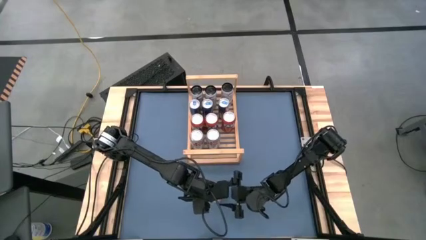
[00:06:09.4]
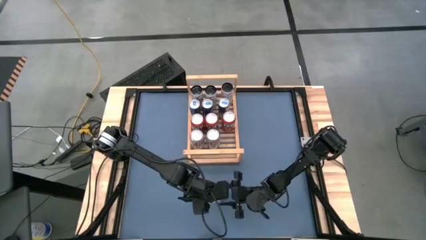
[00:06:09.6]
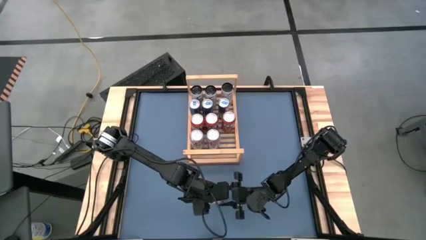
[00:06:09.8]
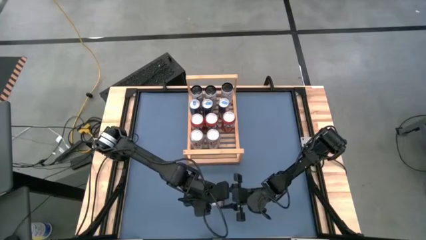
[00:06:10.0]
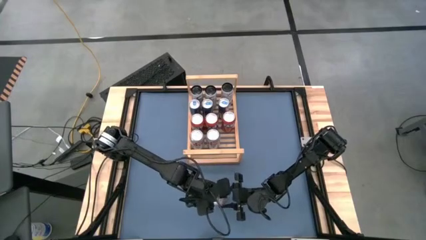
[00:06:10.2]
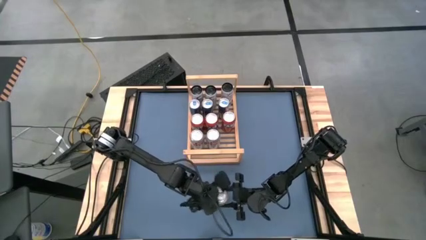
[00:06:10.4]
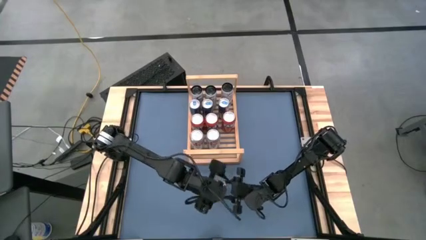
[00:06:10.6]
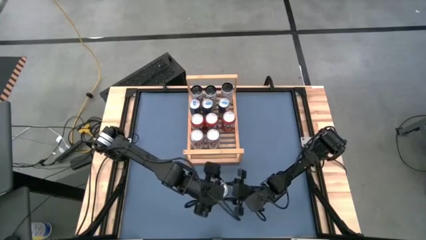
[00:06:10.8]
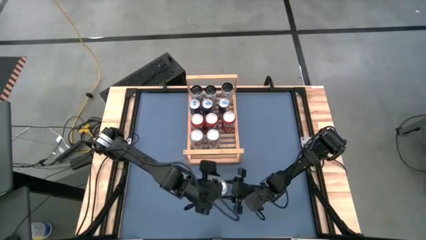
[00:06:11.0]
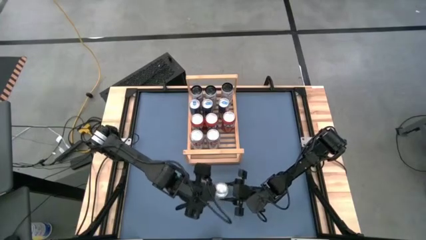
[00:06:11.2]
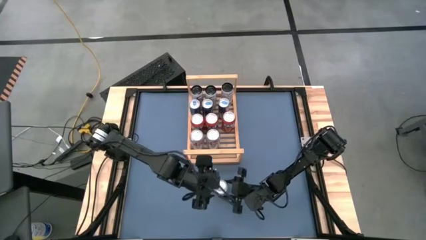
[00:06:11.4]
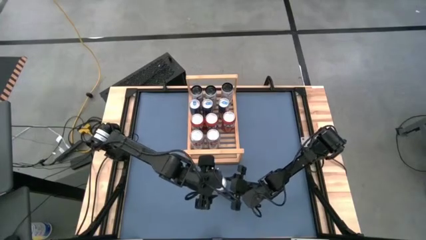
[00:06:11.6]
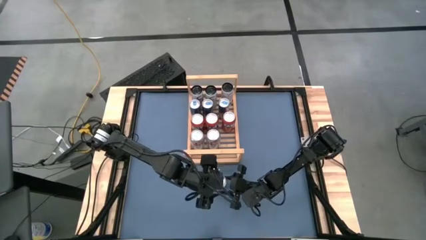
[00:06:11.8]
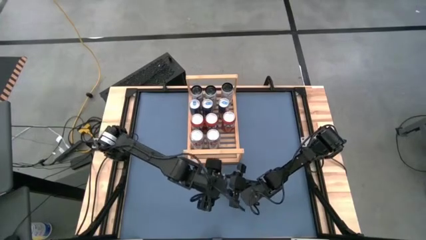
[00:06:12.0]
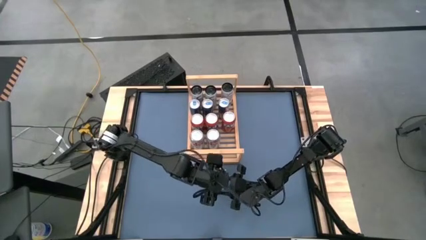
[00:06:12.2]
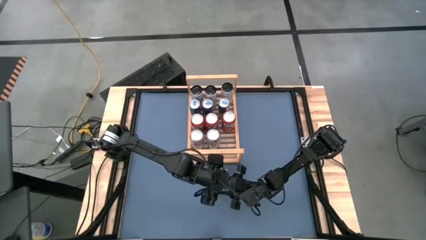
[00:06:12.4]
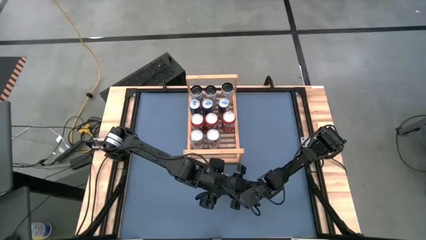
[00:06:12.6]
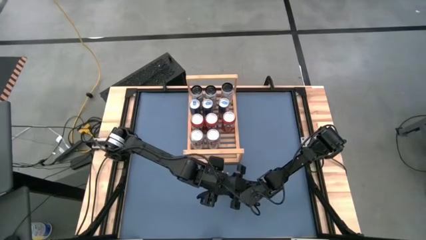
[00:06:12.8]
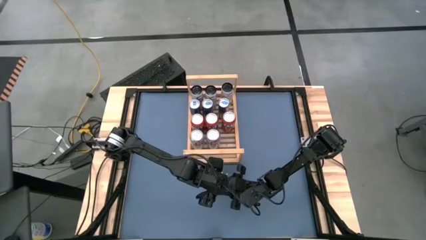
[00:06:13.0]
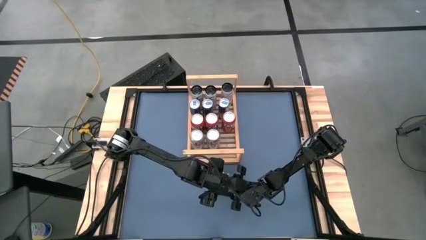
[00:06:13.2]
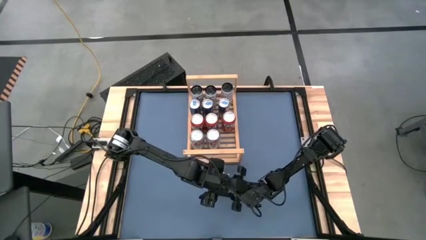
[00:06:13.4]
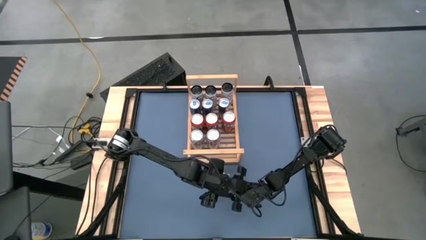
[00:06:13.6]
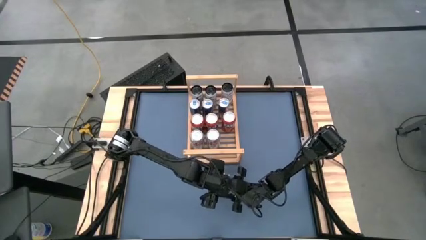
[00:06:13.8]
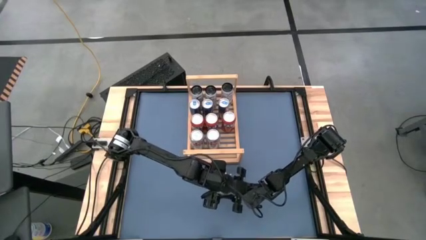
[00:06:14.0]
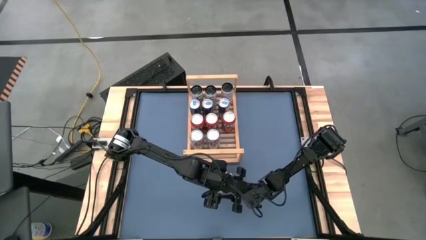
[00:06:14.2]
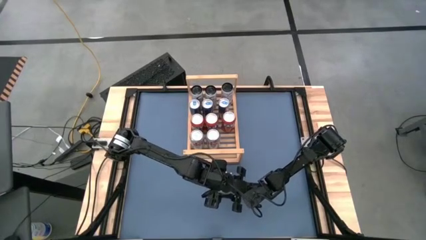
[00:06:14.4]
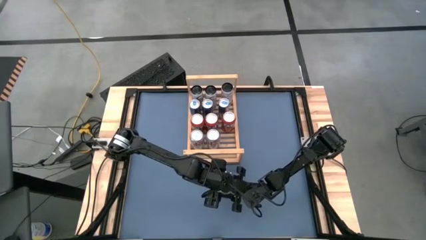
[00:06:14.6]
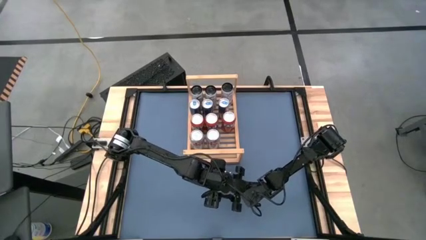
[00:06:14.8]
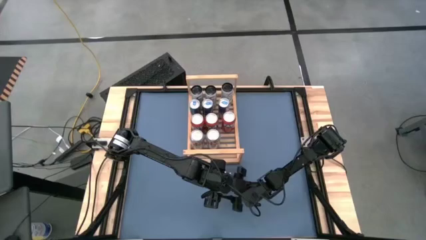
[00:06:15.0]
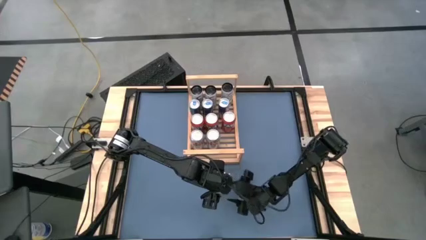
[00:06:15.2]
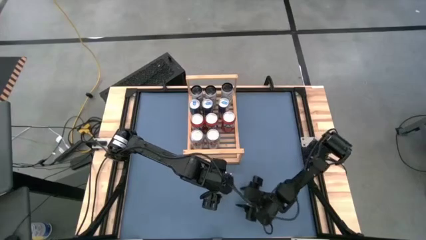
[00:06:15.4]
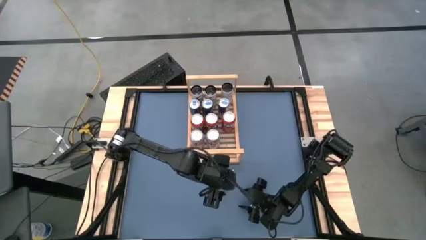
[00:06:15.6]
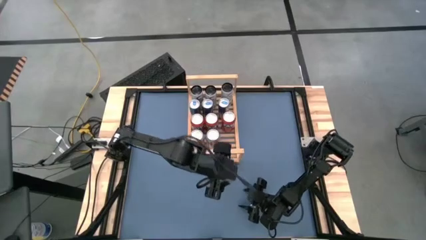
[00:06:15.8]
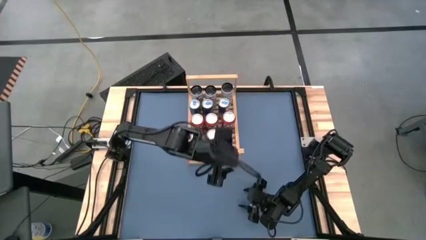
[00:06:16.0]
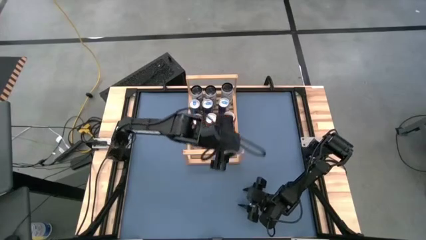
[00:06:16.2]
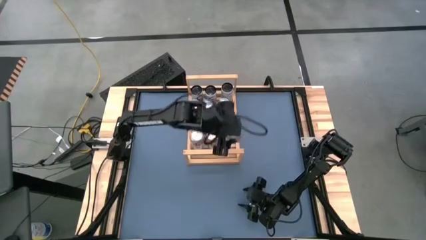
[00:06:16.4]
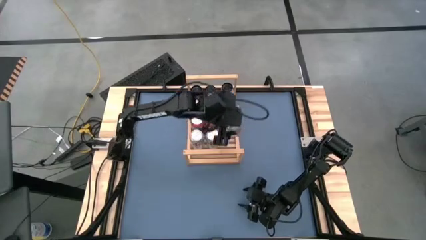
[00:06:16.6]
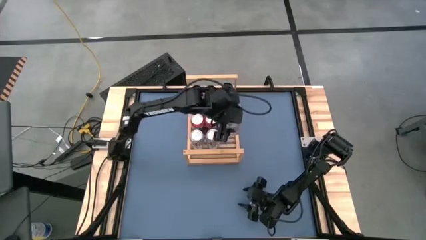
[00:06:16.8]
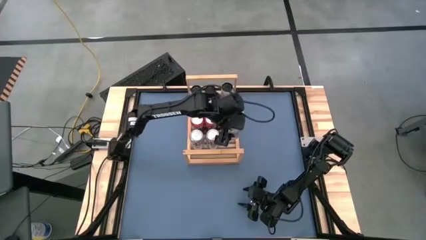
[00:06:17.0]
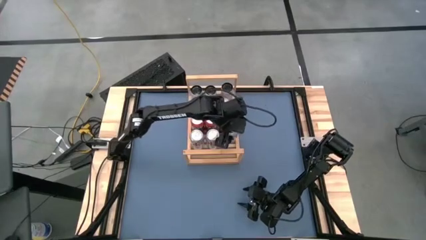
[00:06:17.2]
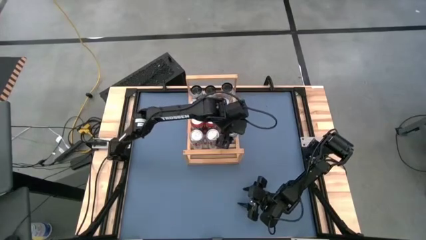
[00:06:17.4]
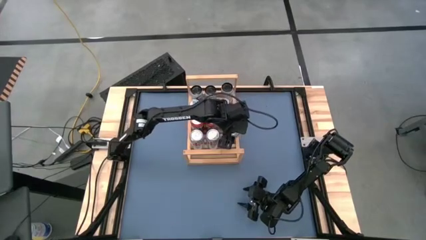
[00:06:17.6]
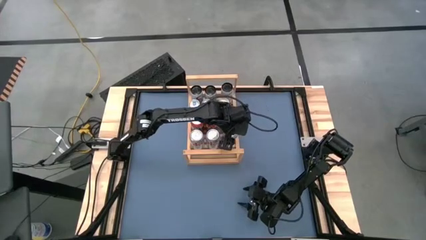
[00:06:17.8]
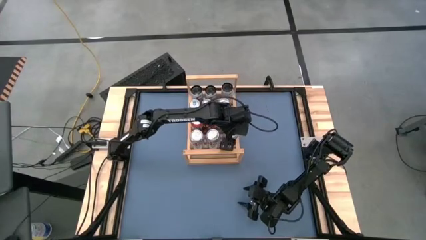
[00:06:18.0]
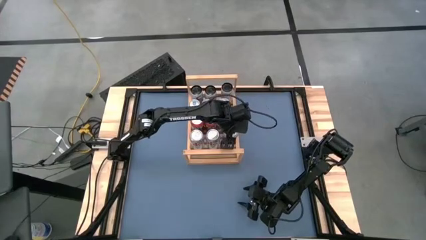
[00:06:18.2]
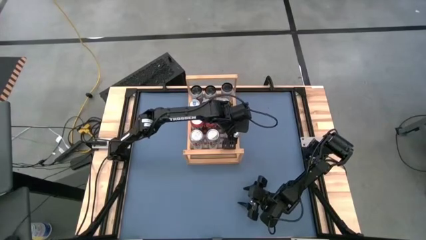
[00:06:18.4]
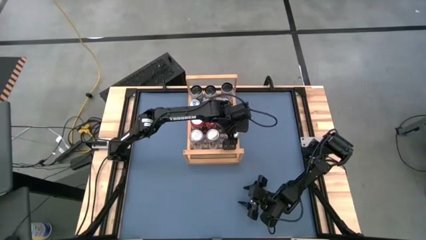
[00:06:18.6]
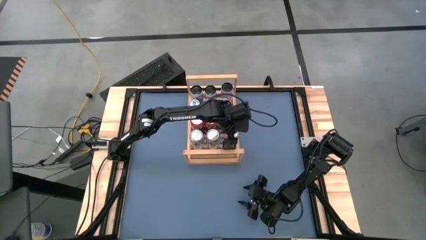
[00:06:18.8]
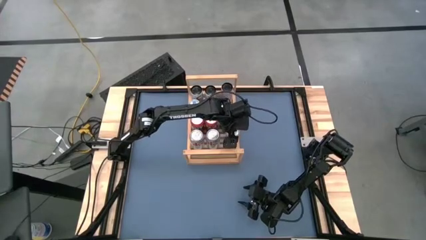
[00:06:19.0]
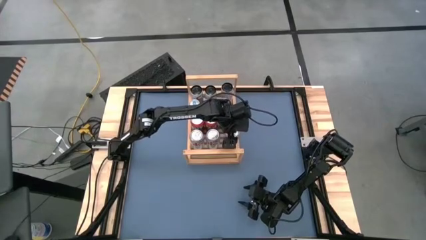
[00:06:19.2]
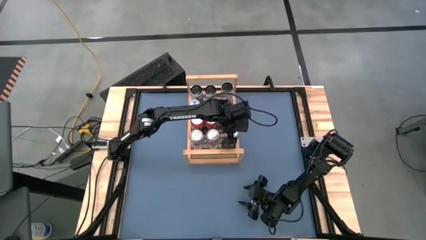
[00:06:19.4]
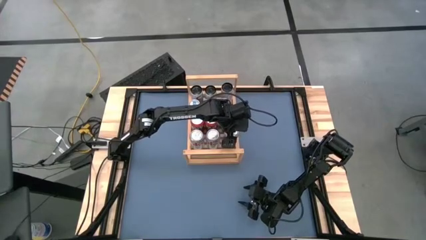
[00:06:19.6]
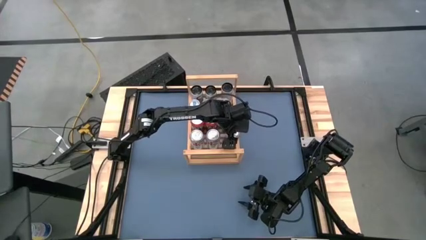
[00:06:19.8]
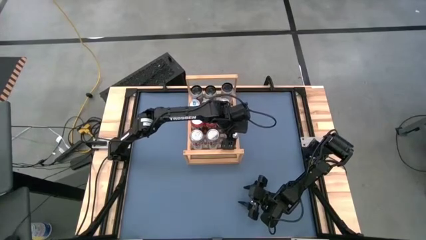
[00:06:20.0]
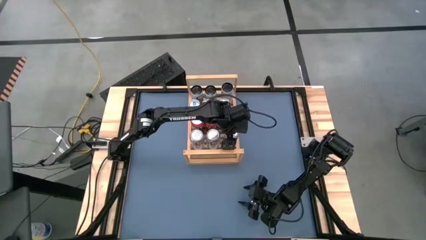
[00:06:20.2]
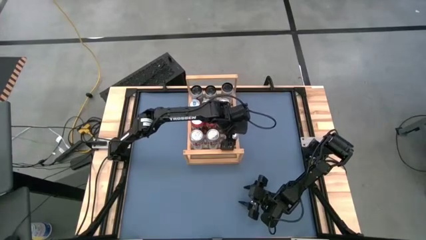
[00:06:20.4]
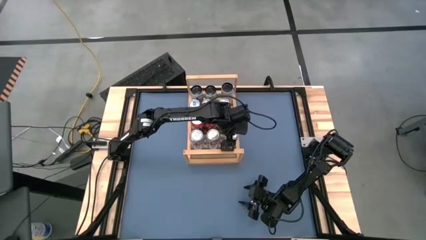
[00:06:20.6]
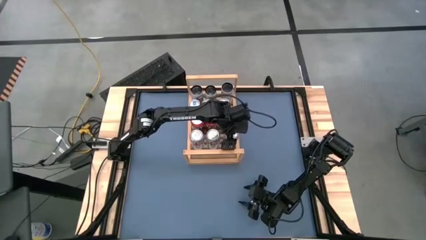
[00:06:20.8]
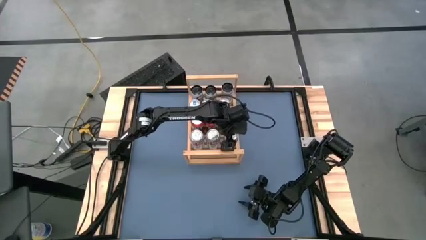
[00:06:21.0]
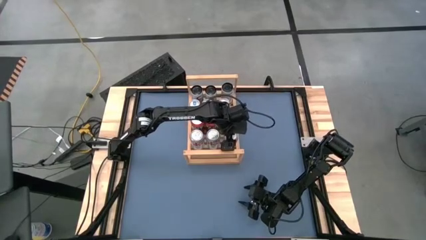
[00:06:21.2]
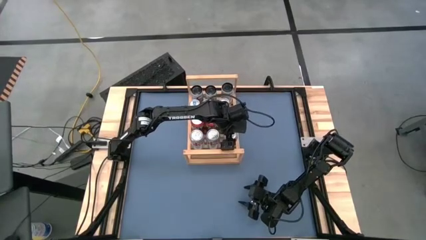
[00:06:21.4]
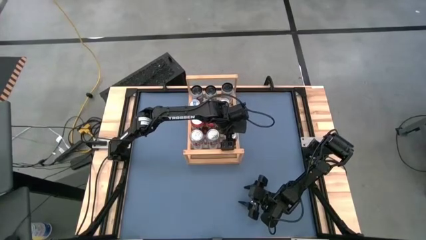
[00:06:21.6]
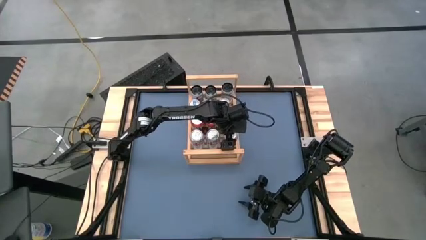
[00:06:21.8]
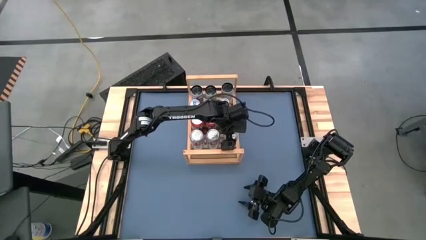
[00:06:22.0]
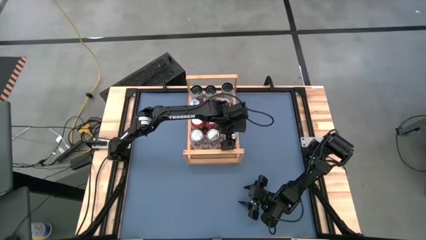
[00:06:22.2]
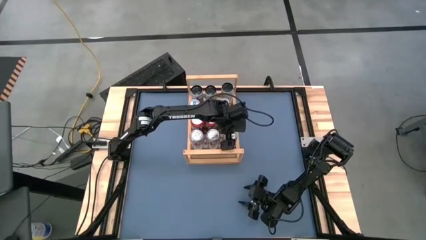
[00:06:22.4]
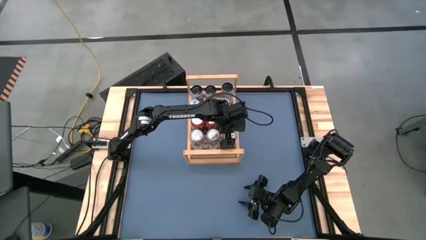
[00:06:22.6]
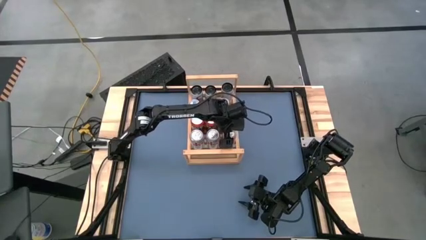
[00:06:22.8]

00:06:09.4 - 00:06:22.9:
Task: Place canned beverage on shelf
Put the silver can on the shelf aligned with the other silver soda cans

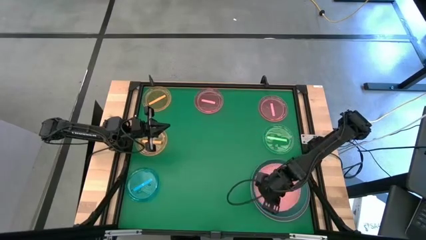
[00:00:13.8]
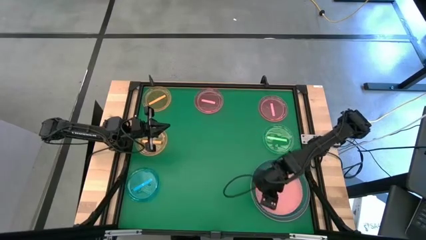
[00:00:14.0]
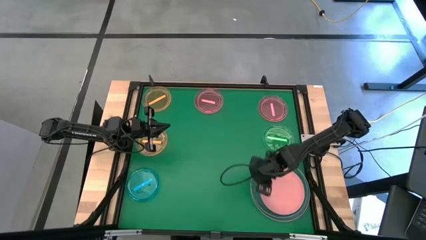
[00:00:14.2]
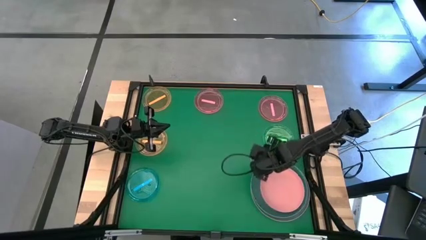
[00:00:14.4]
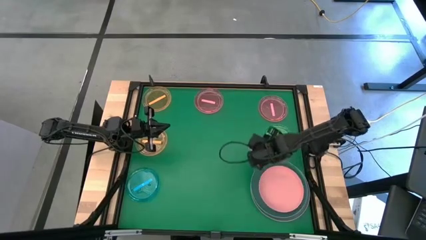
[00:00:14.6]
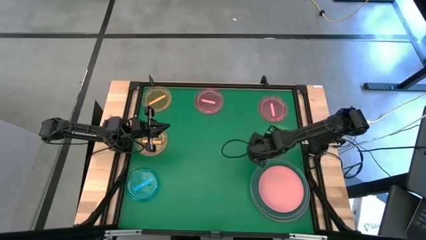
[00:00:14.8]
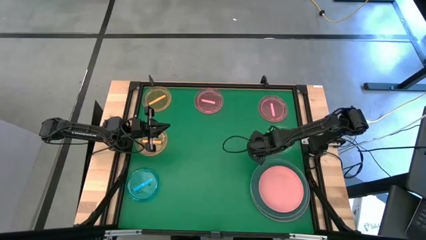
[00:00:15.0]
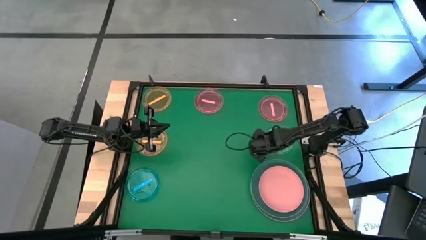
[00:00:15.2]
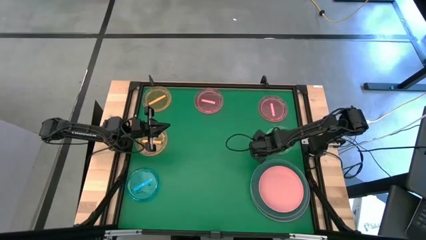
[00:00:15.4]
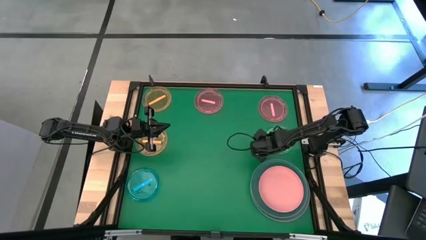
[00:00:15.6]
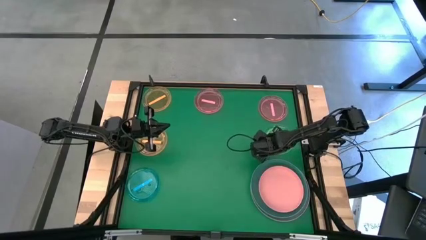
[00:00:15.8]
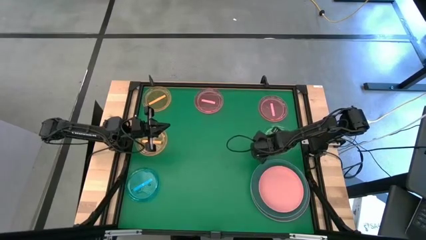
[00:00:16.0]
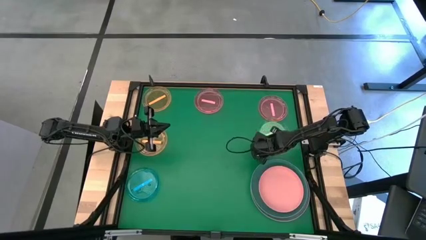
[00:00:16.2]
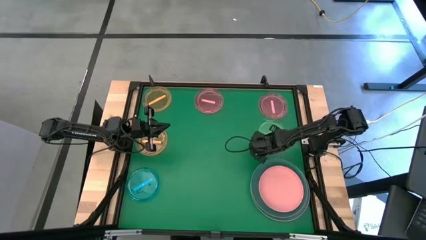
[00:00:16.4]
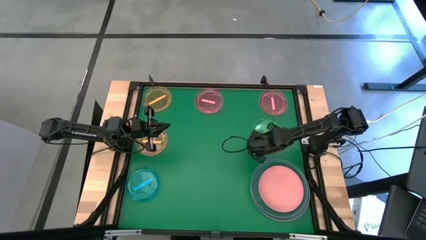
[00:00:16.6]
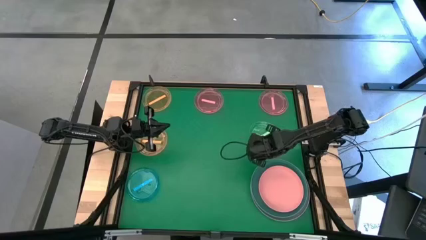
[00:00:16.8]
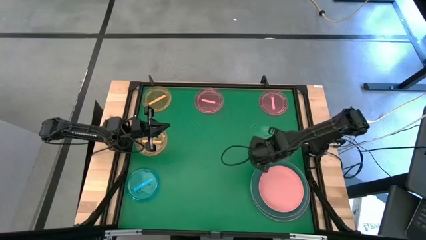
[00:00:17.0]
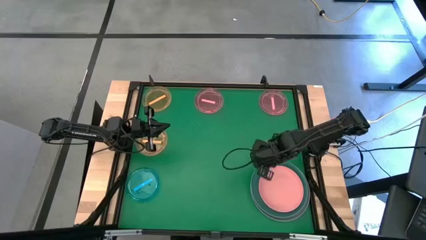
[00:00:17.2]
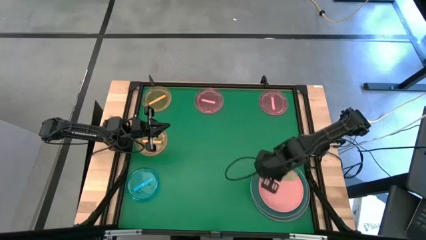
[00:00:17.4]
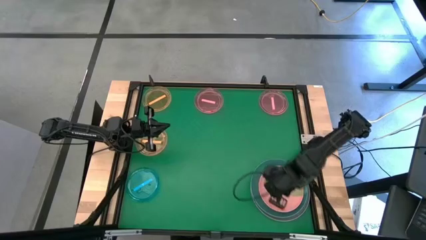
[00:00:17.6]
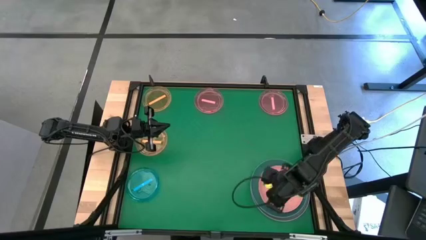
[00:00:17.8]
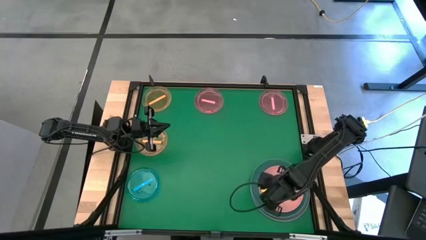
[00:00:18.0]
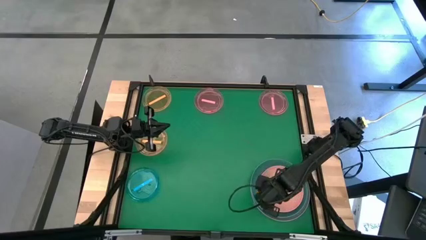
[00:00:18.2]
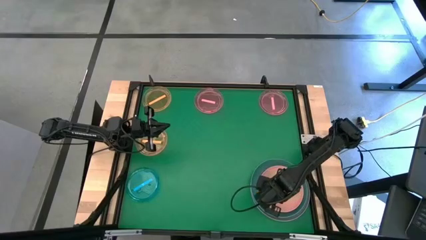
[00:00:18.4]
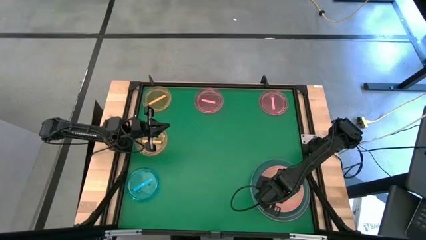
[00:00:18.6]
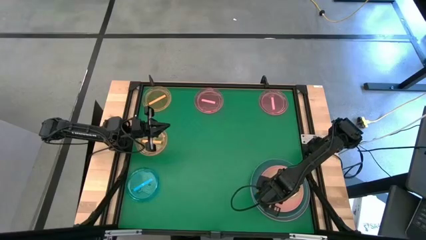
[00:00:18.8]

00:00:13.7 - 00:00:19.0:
Task: Stack plastic plates
Stack the light green plate on top of the pink plate
